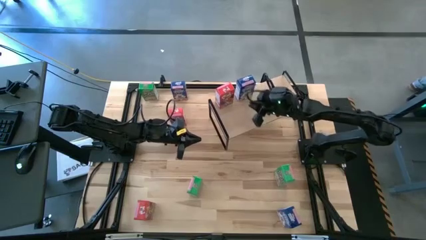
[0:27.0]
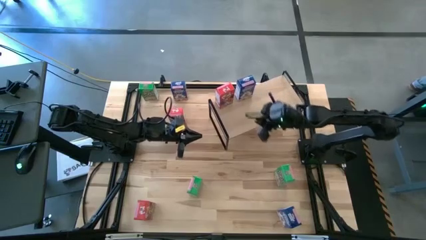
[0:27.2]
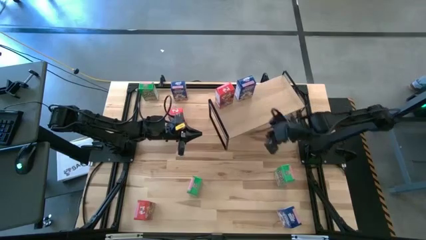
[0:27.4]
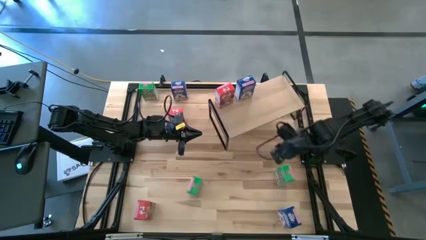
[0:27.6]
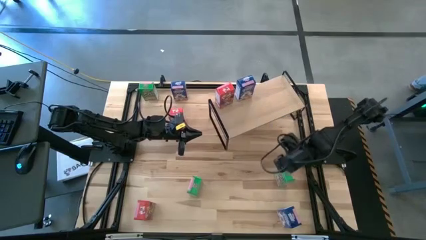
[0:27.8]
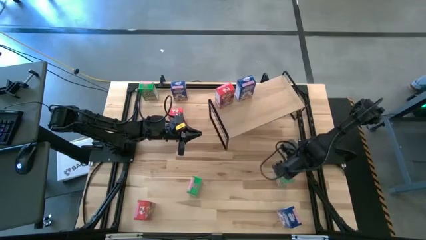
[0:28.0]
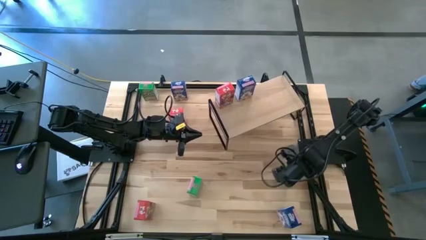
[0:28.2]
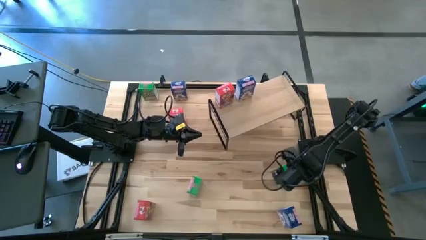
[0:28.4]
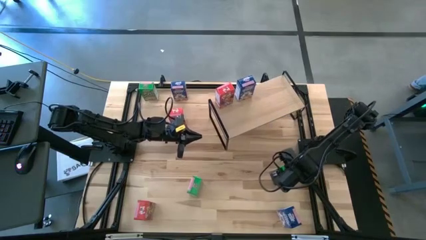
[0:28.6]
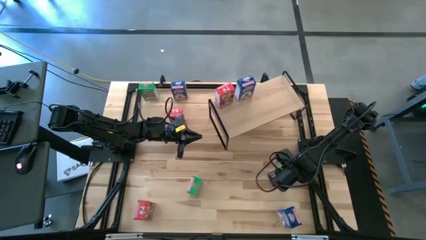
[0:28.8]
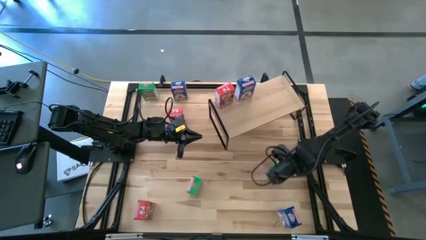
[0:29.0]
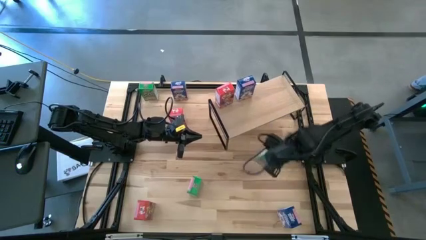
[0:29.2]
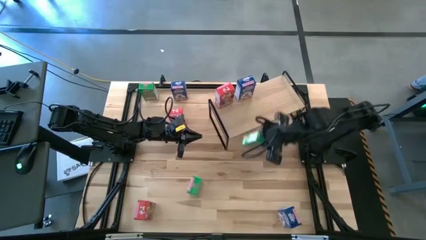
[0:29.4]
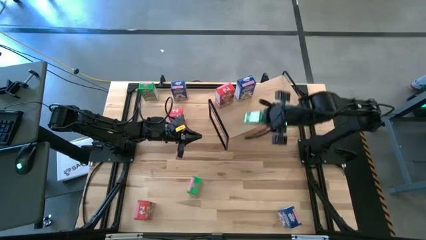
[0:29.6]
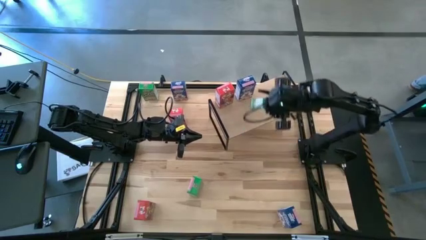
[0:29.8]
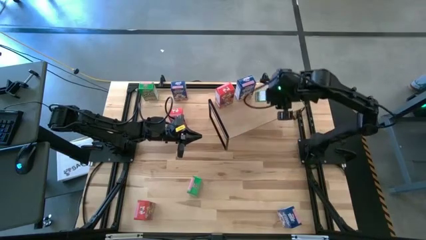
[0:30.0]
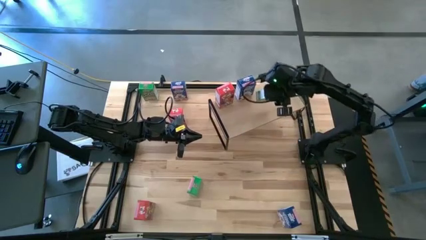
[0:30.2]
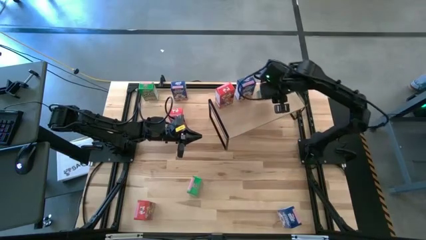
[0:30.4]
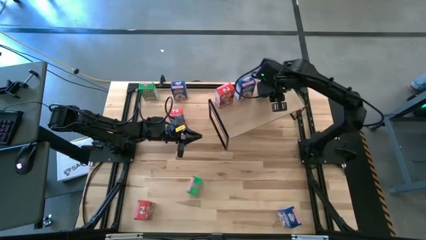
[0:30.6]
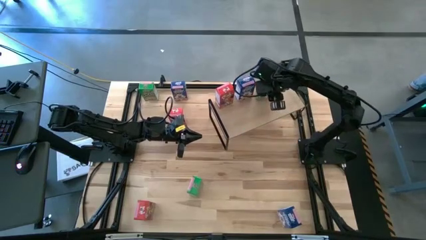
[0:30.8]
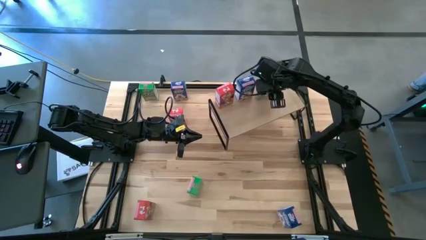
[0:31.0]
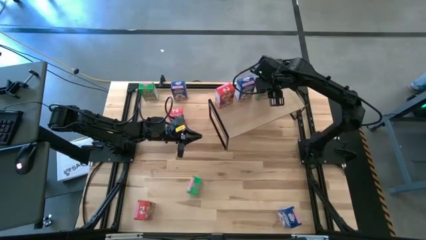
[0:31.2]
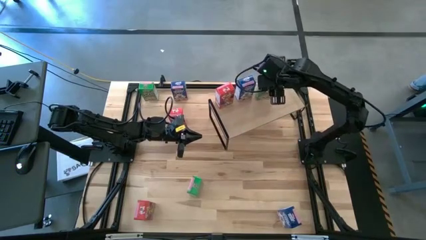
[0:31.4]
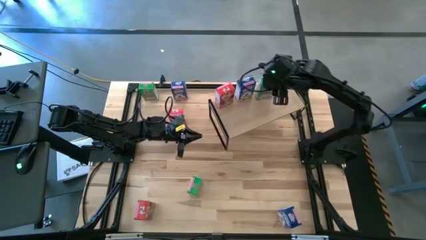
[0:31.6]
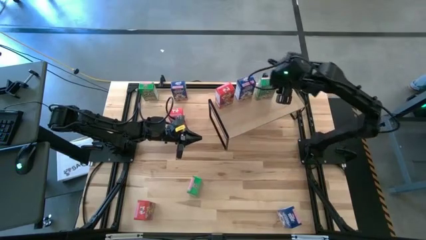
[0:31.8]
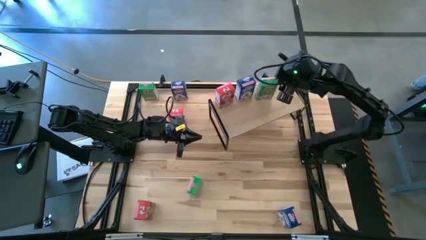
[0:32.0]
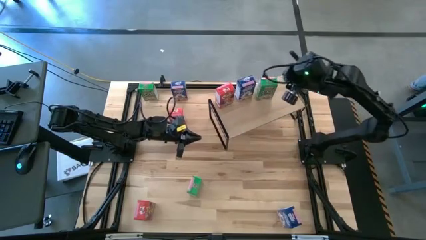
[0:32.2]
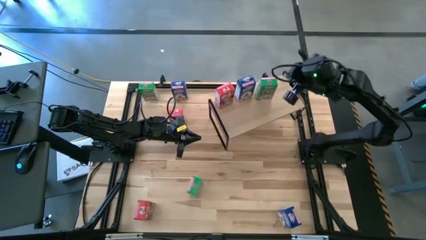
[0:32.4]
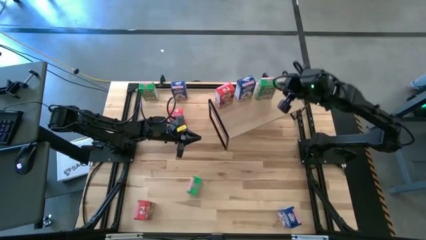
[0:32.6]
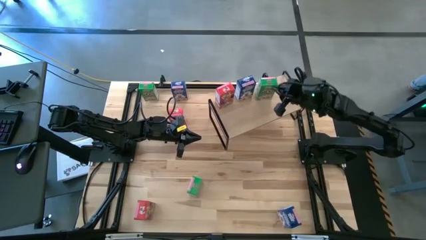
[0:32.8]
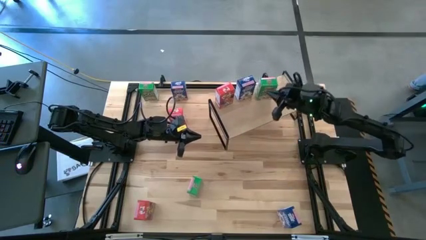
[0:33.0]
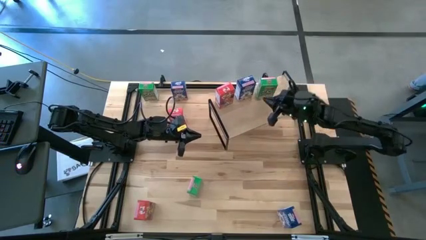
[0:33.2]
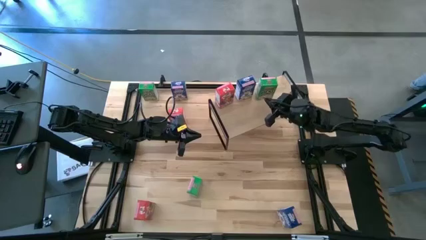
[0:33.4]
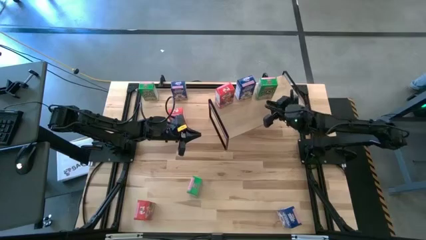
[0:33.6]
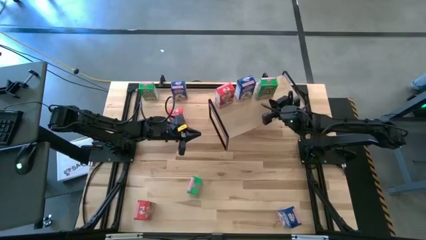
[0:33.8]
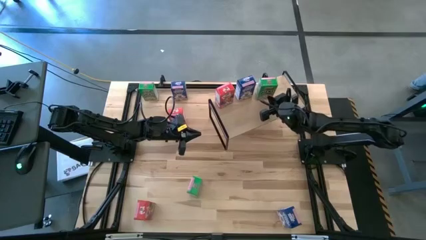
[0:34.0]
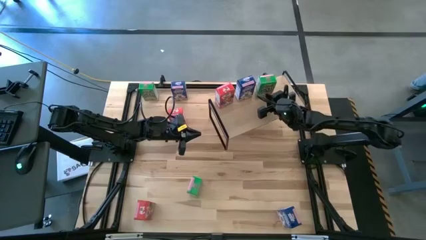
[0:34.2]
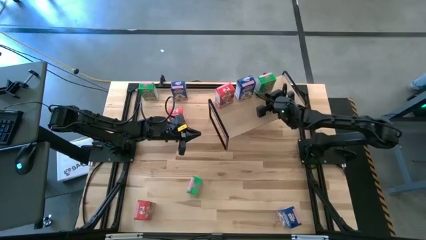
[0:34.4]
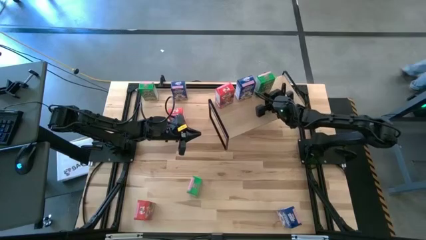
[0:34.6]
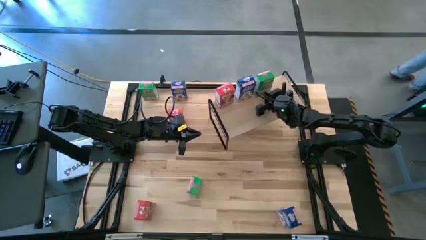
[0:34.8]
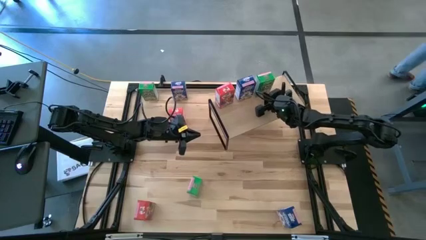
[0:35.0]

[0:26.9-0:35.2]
Task: Stack cereal on shelf
Put the right green cereal box on the shelf

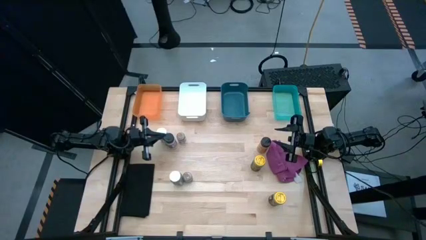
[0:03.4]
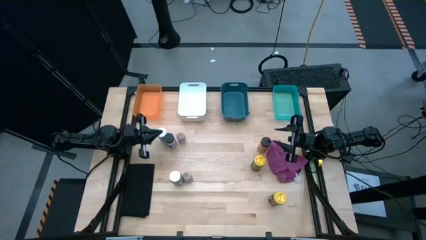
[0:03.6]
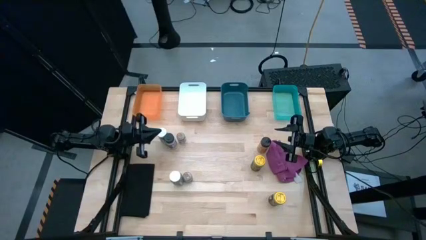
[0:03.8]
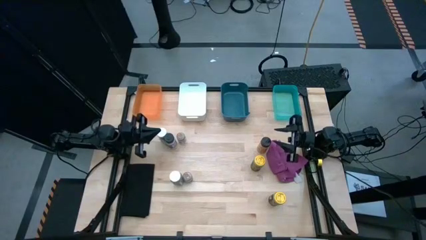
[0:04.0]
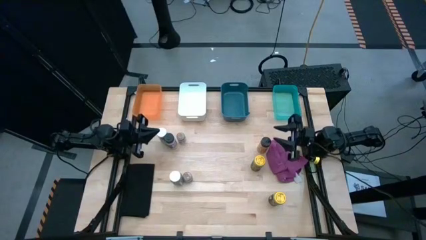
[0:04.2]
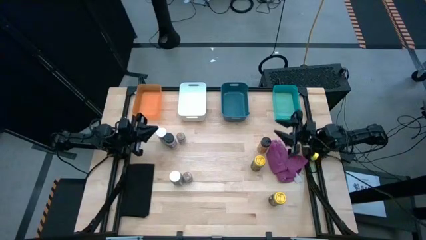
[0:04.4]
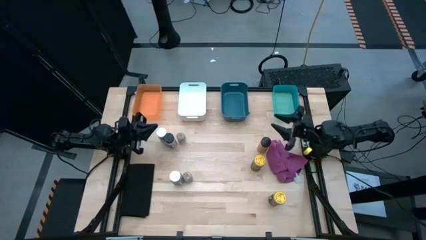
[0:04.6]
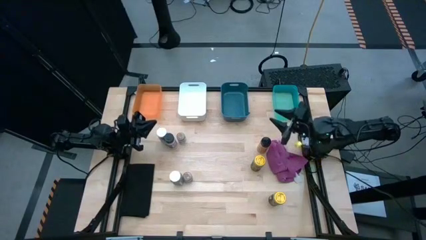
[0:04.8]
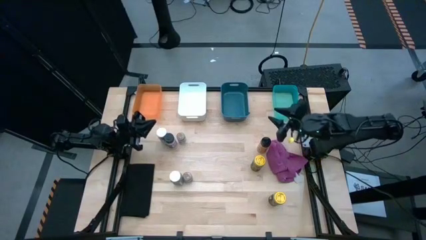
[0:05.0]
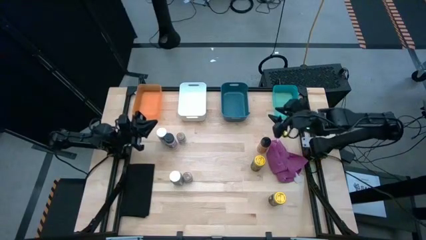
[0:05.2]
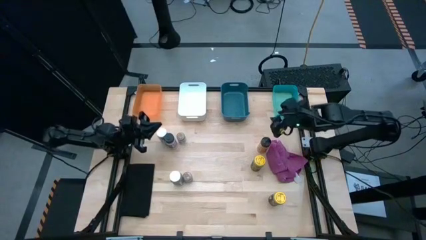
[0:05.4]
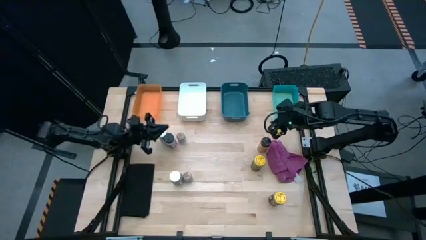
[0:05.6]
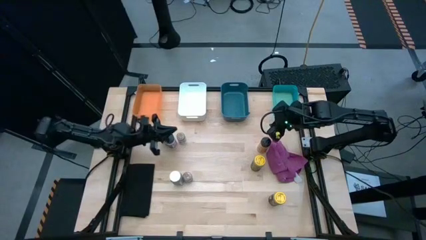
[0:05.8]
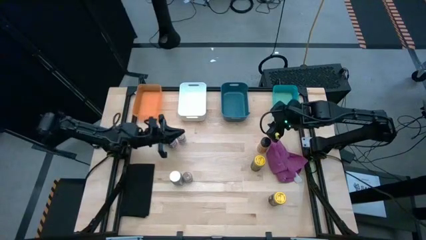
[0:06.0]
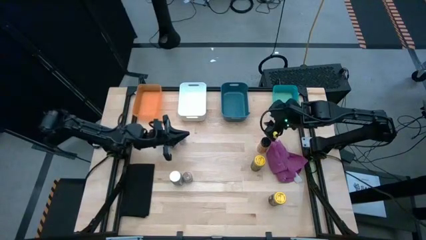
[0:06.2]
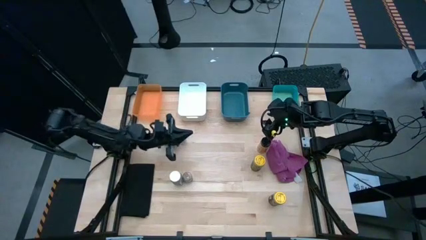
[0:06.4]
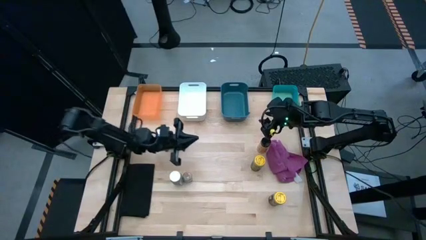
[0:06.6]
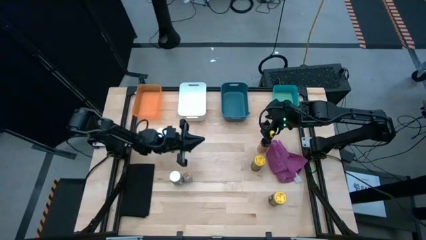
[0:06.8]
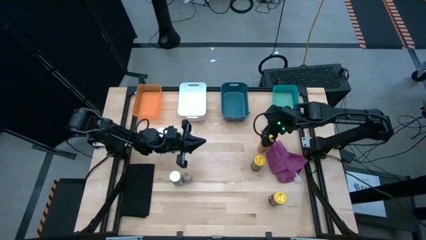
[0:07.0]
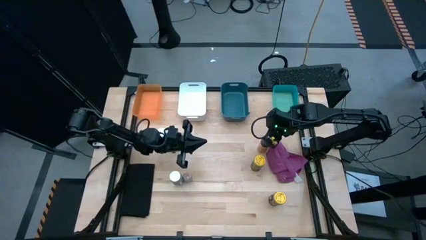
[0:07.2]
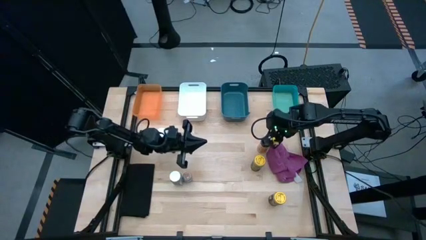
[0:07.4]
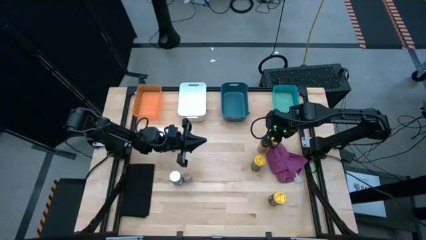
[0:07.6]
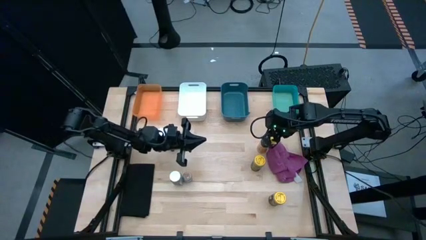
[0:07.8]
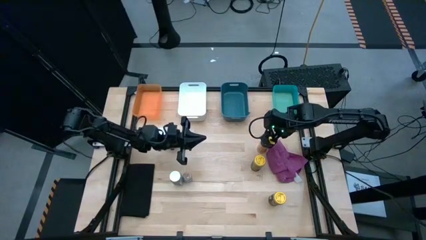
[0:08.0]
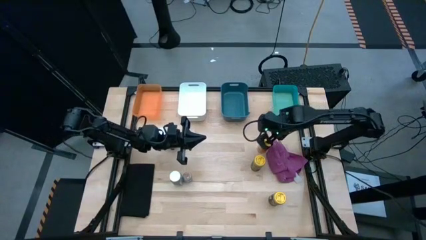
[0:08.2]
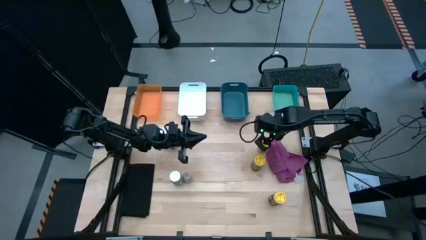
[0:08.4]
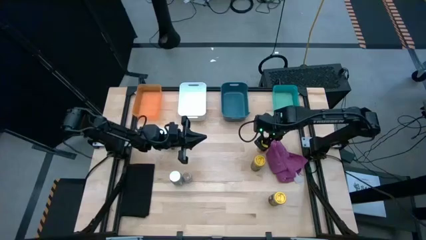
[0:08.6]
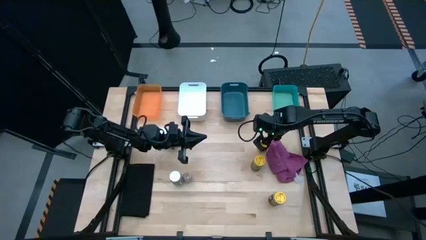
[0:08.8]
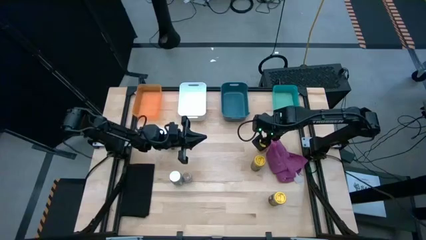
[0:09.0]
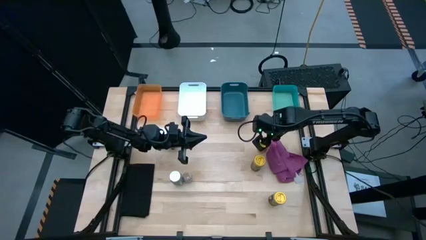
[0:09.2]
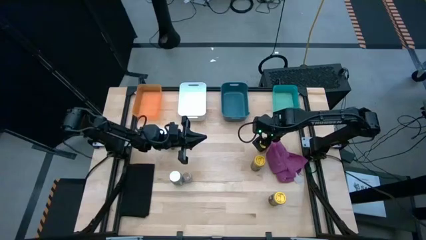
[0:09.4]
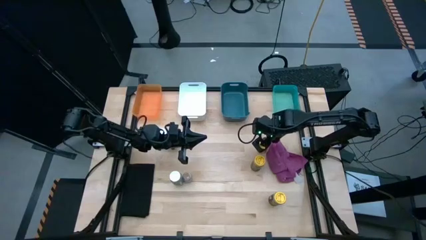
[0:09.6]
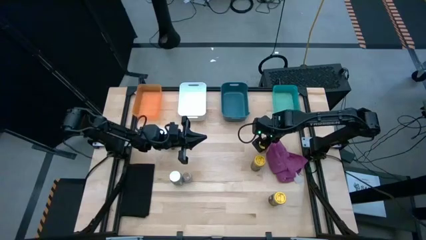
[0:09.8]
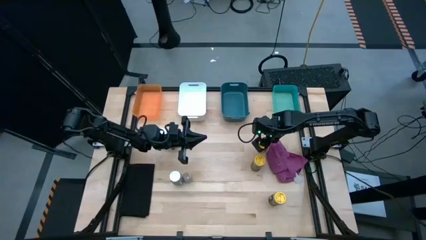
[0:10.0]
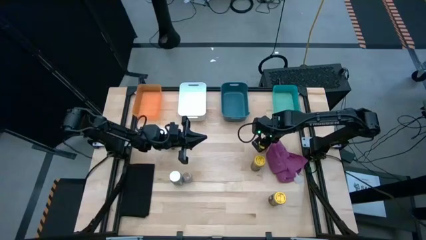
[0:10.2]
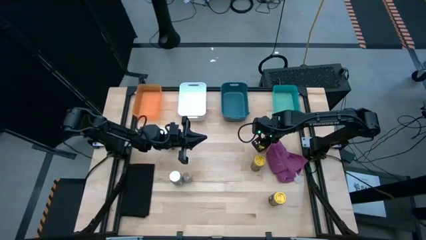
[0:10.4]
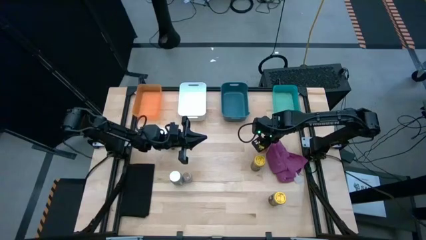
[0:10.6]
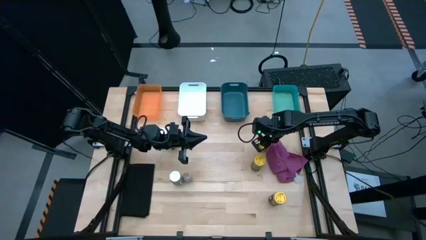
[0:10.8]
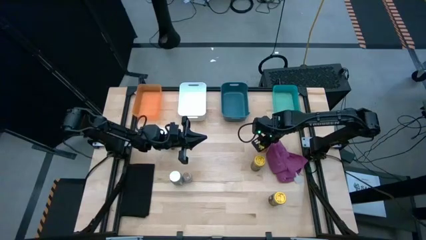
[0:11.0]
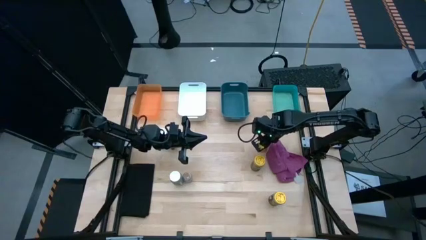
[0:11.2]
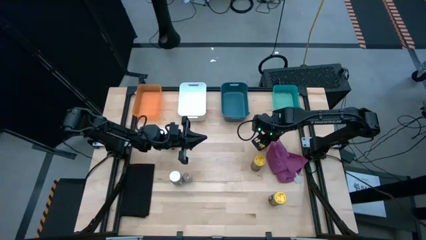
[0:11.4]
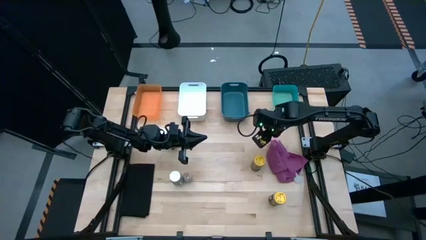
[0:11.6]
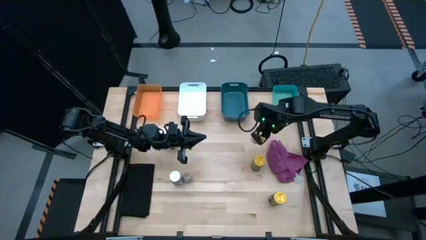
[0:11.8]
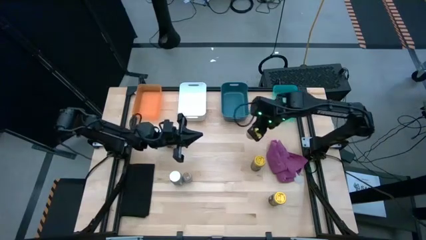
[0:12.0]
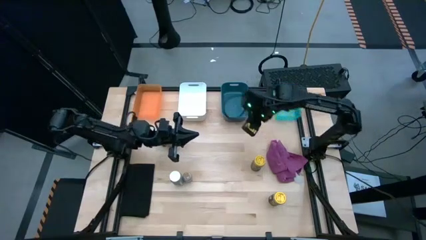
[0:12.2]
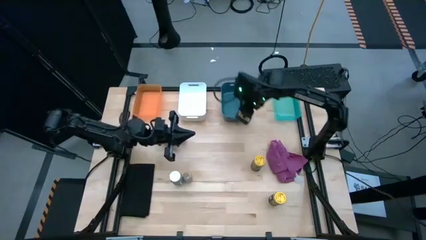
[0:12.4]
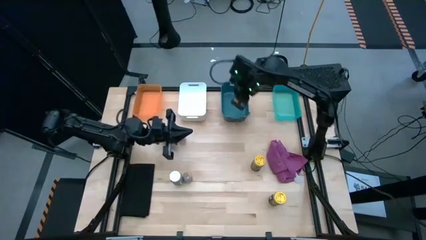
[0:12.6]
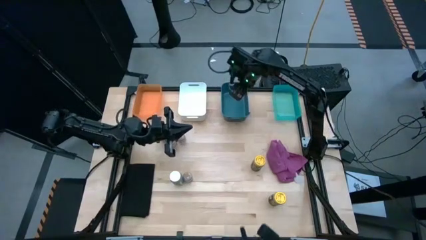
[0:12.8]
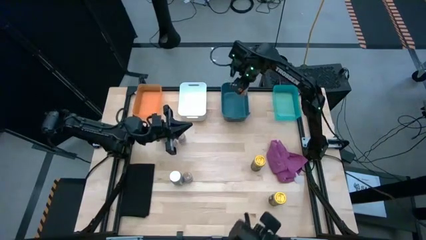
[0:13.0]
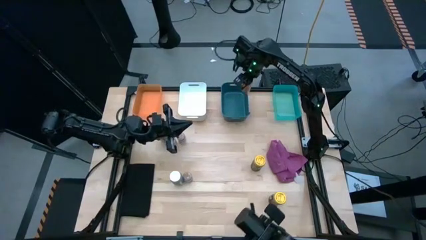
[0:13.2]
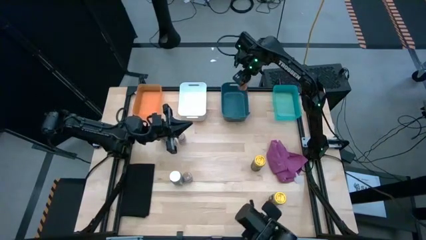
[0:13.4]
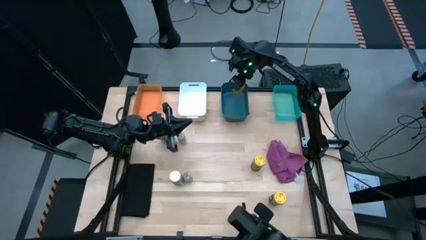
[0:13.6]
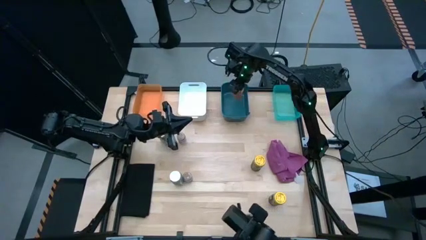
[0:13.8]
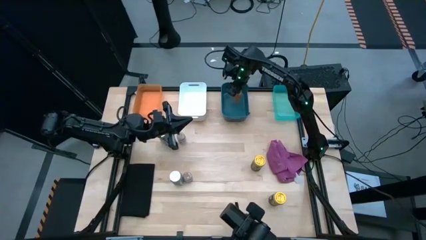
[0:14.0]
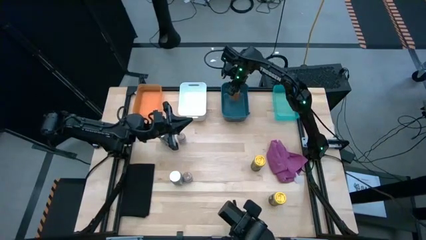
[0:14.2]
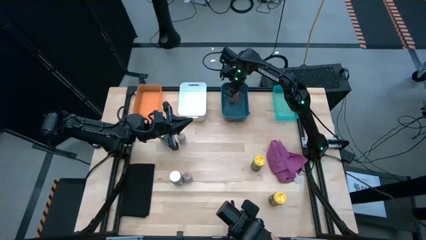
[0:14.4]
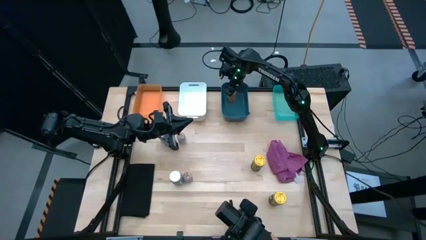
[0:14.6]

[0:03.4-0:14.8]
Task: Sort spices by type
Put the right black seasoning bottle into the green bin
